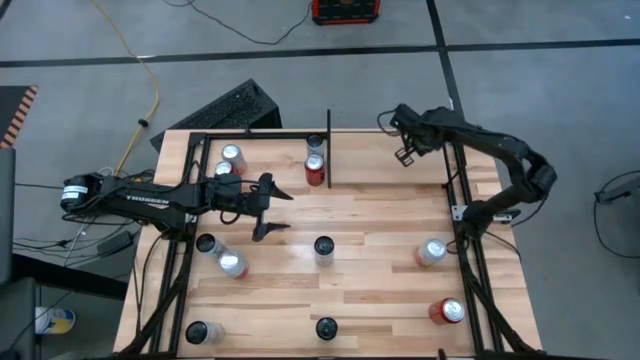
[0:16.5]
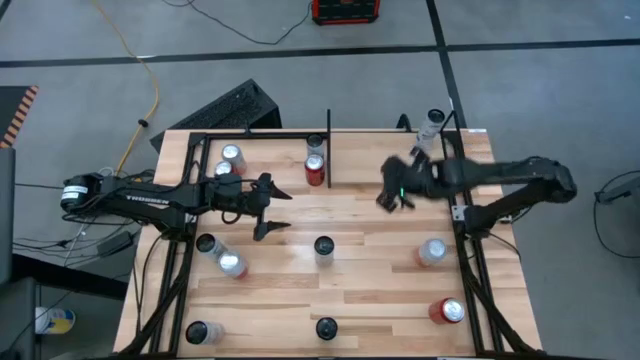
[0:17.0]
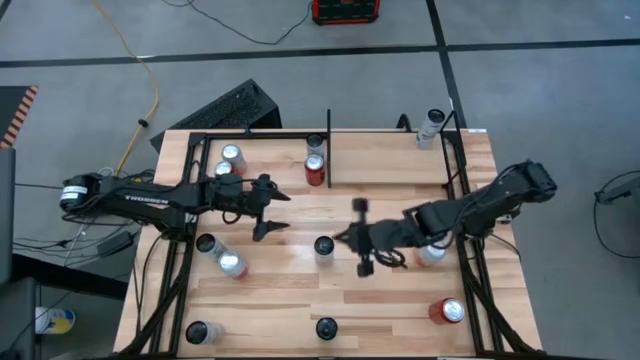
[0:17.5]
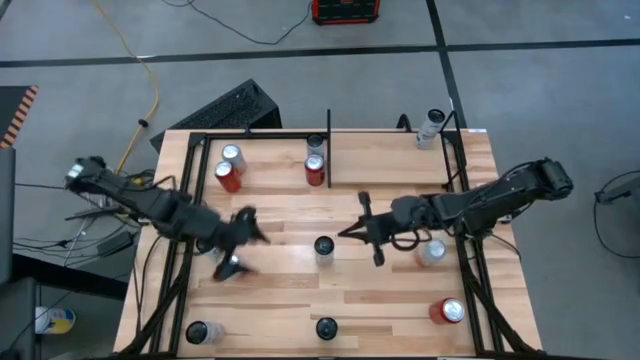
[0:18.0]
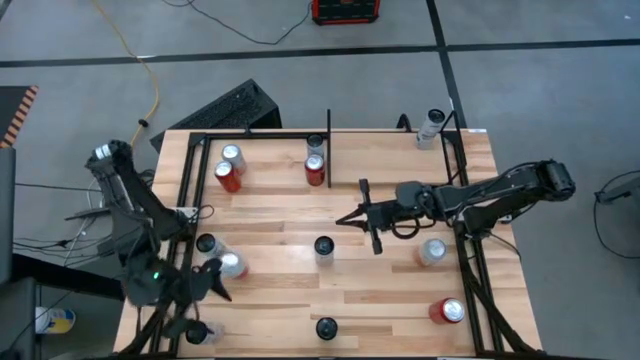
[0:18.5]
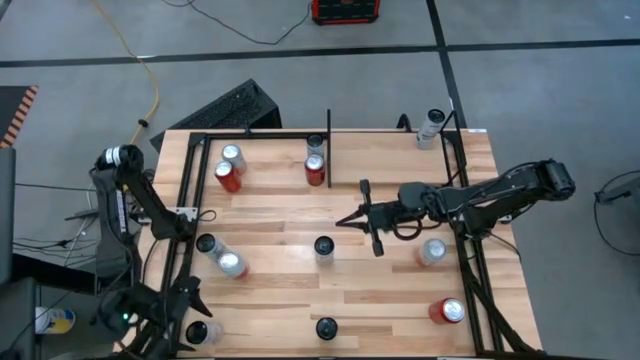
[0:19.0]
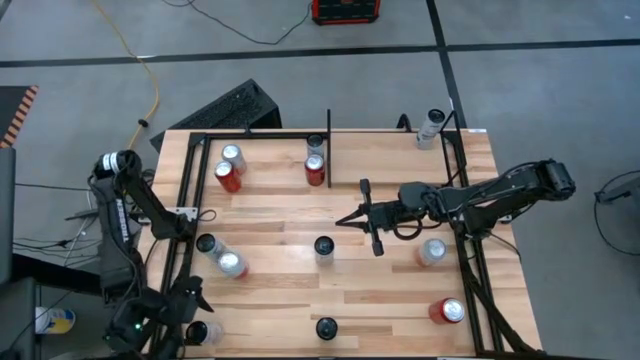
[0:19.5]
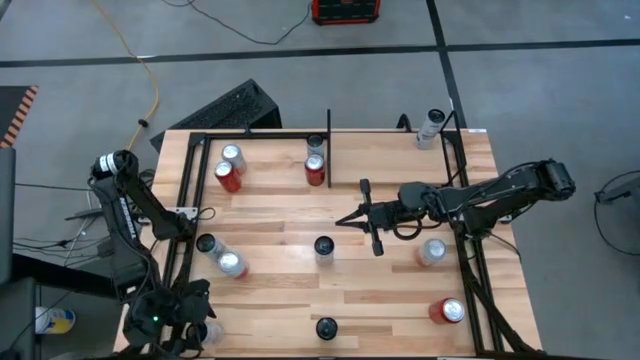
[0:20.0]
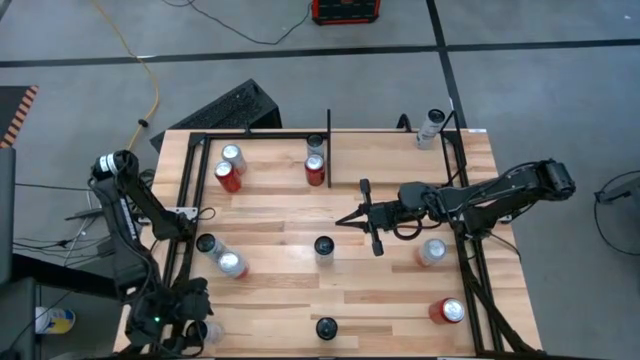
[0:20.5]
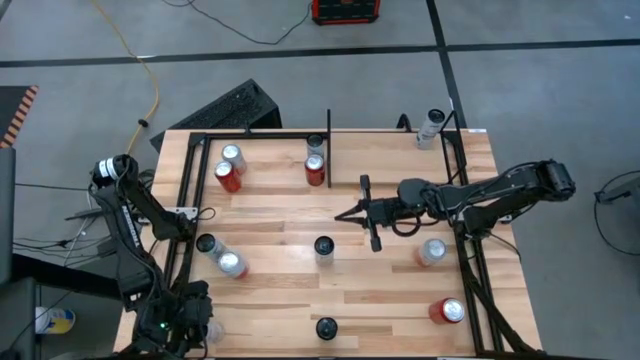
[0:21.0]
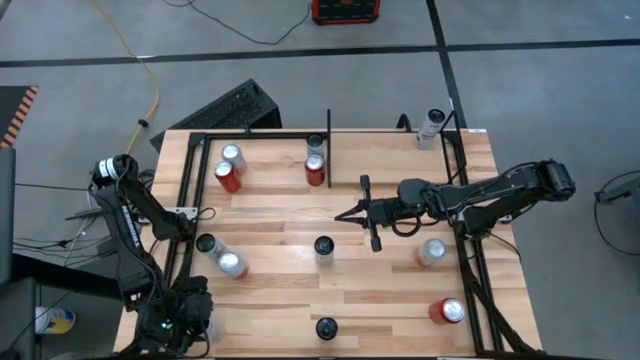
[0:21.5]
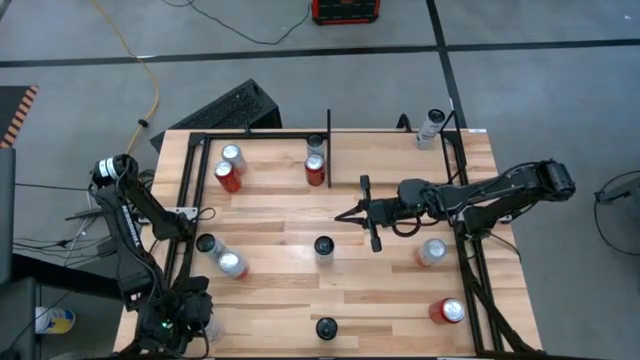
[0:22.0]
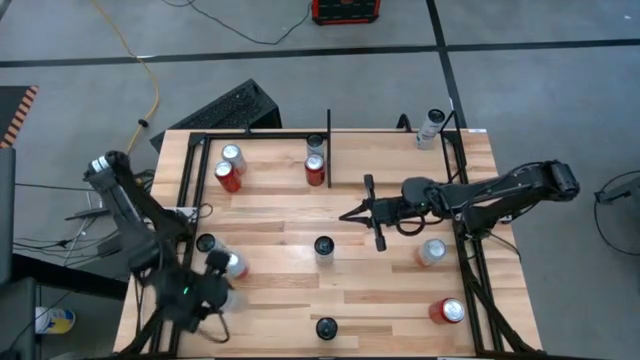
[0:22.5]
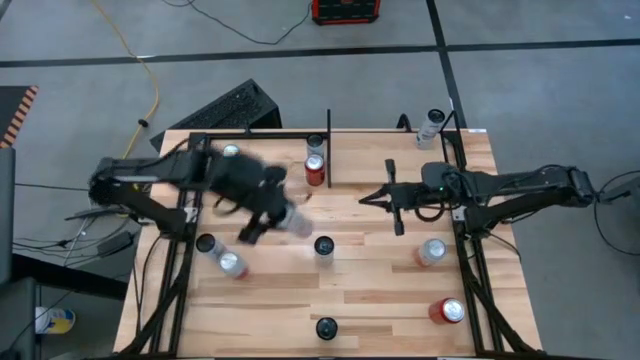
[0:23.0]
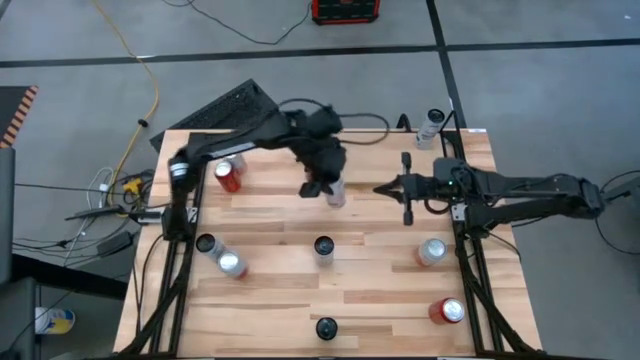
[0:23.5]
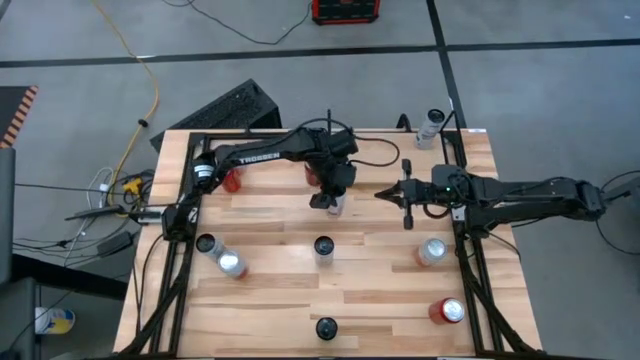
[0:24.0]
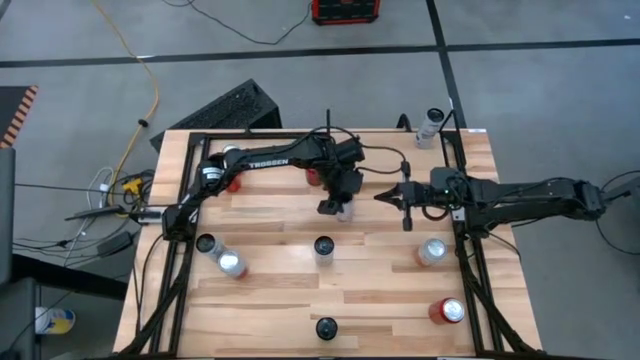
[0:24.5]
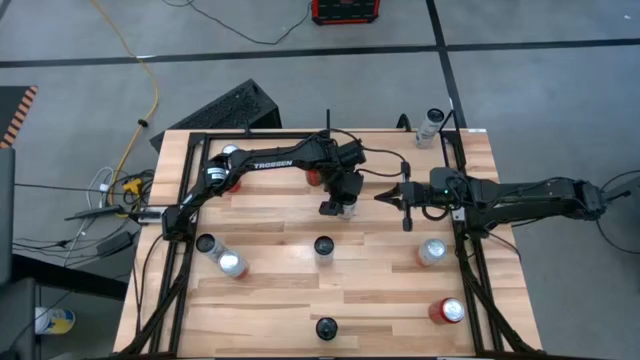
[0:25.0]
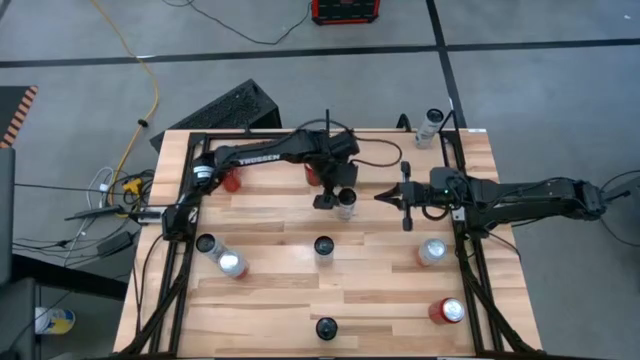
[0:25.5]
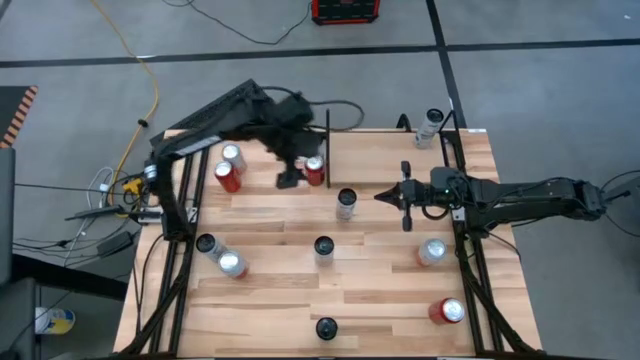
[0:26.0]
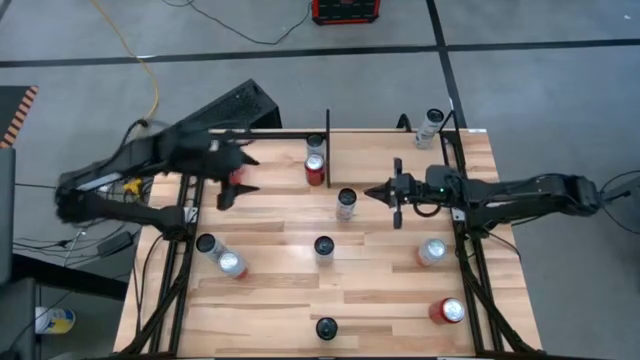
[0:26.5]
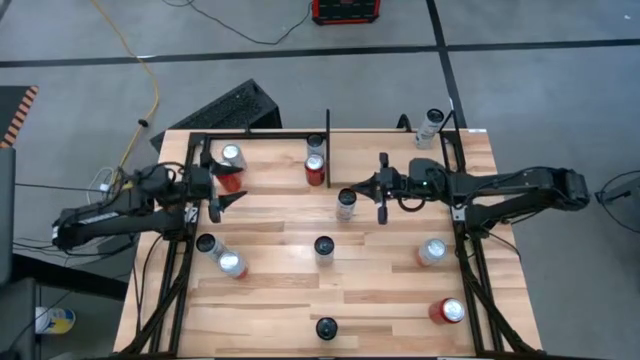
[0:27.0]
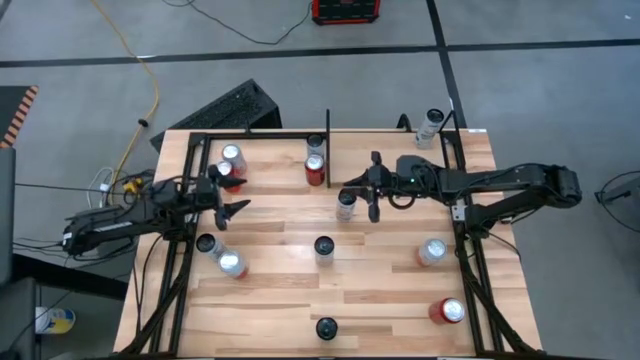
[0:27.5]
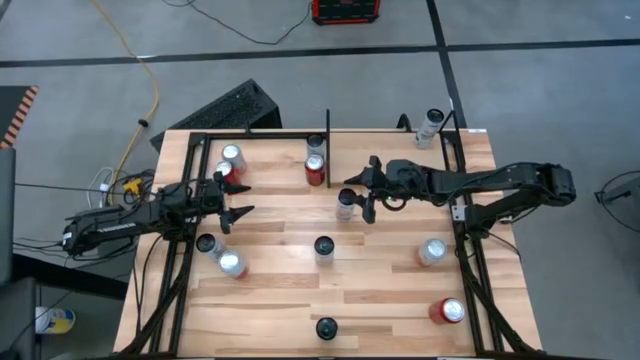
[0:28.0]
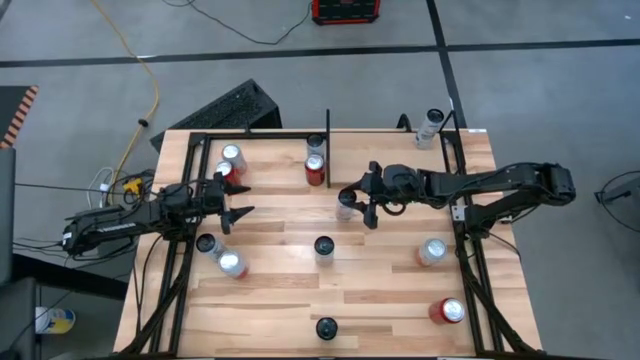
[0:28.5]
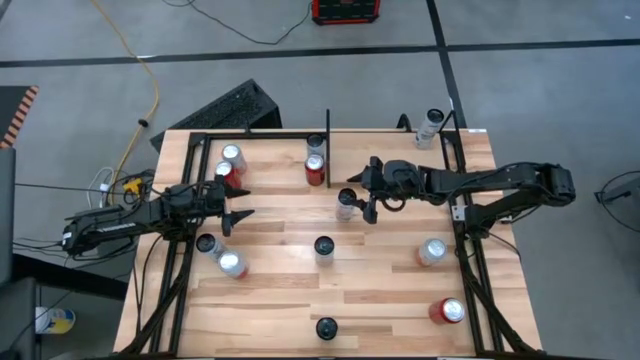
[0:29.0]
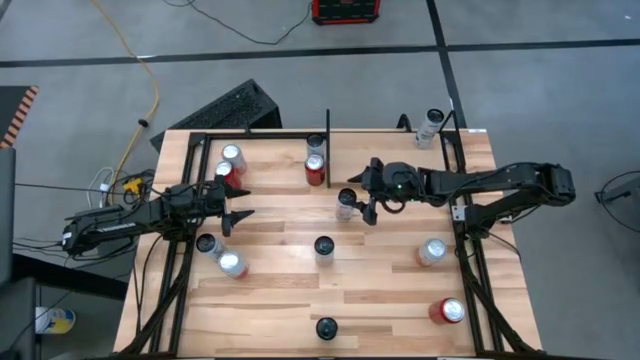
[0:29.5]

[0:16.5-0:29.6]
Task: Place canned beverage on shelf
Put the black pink soda can on the shelf

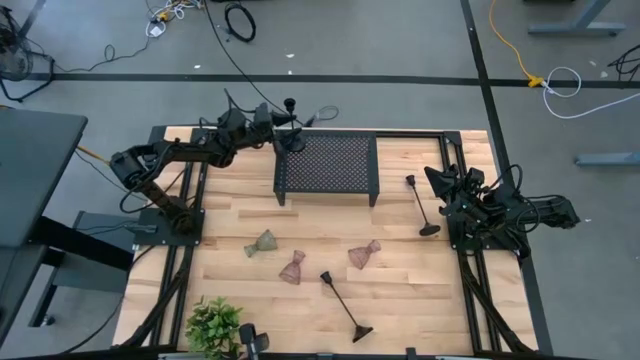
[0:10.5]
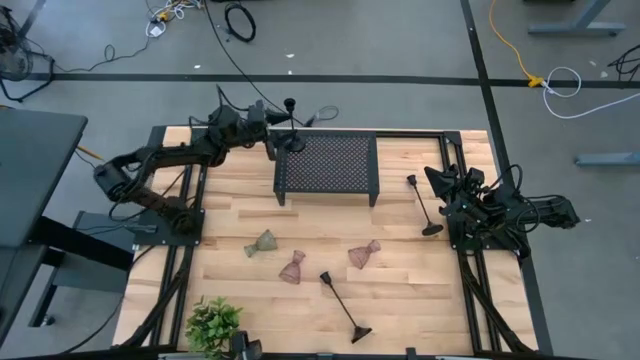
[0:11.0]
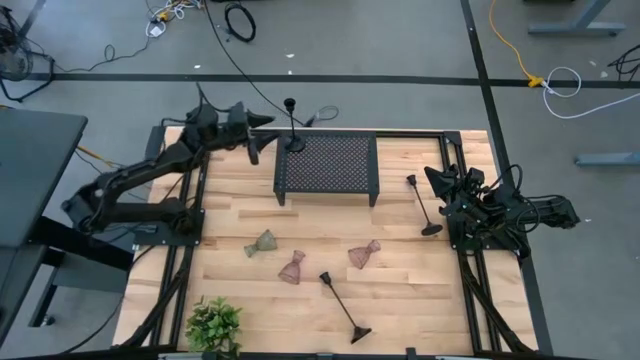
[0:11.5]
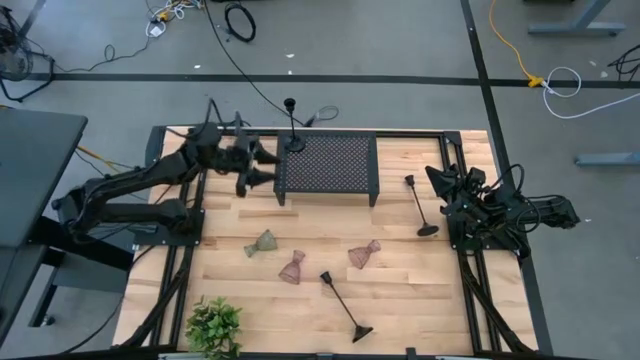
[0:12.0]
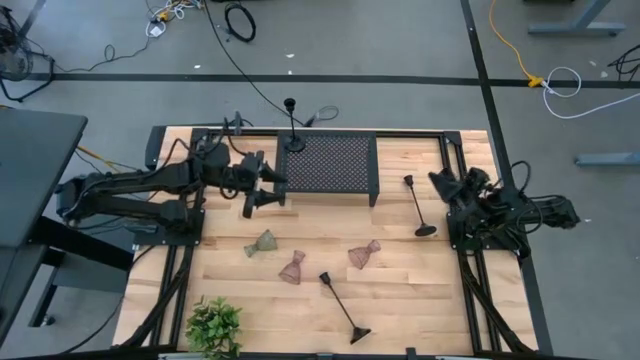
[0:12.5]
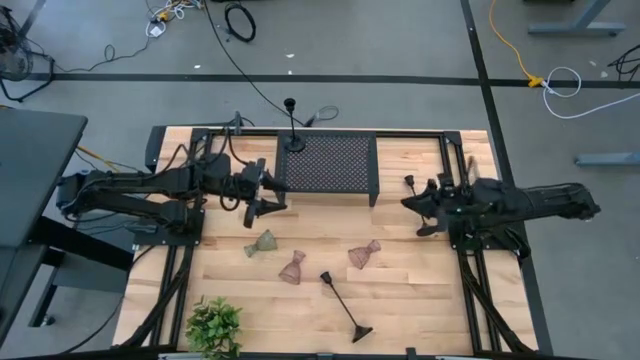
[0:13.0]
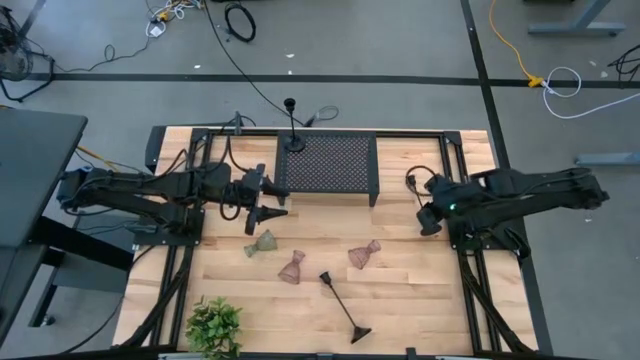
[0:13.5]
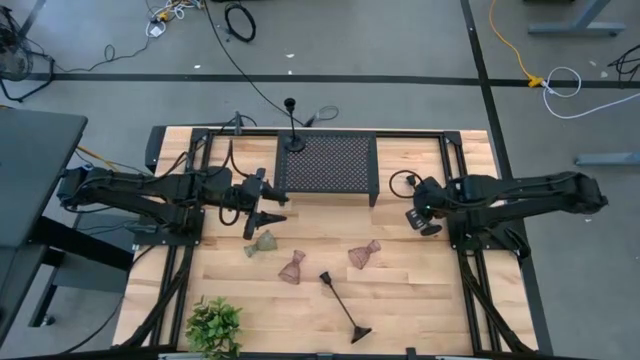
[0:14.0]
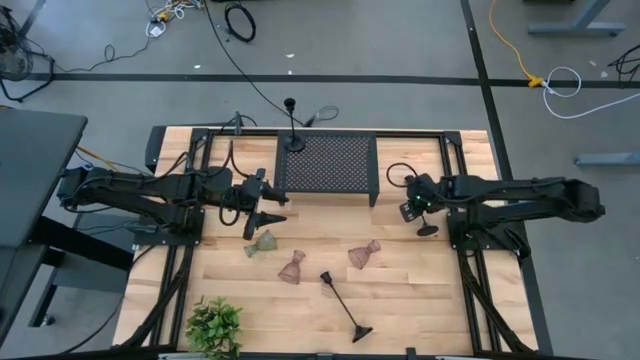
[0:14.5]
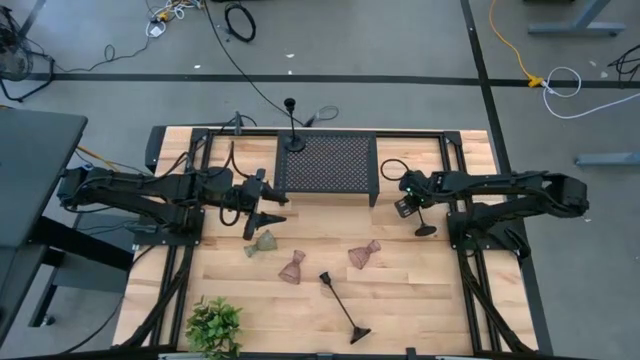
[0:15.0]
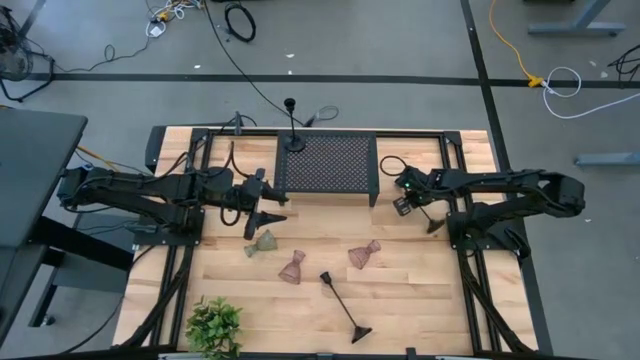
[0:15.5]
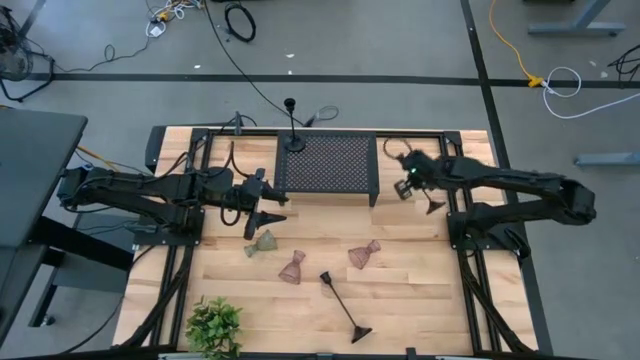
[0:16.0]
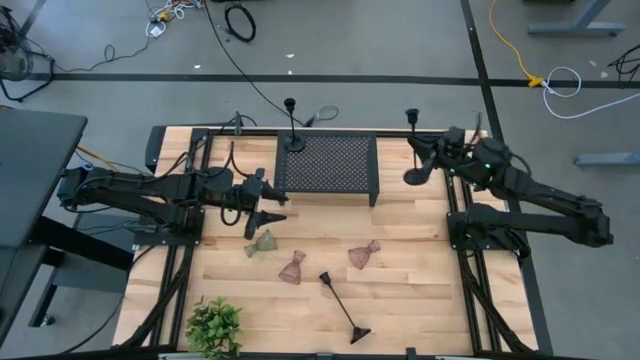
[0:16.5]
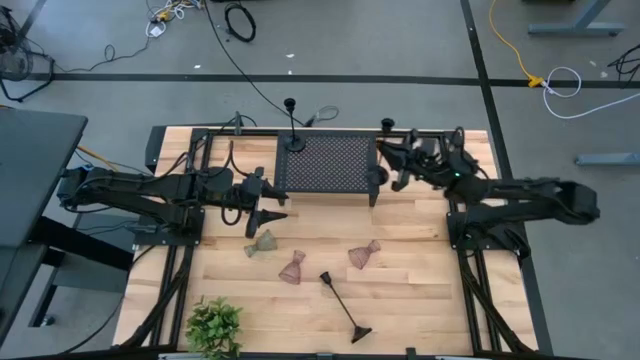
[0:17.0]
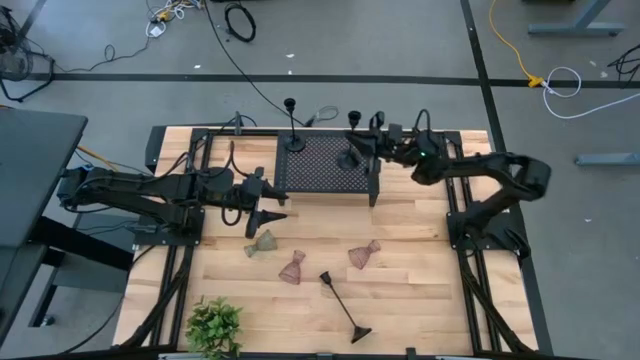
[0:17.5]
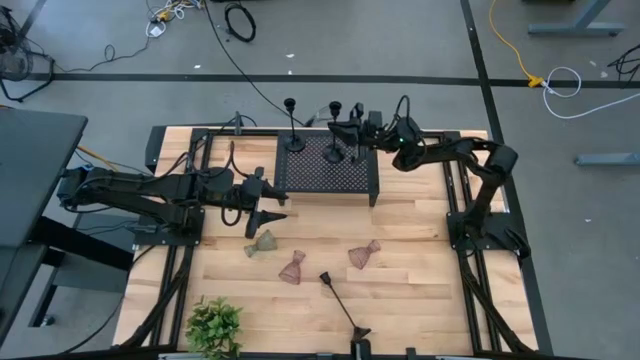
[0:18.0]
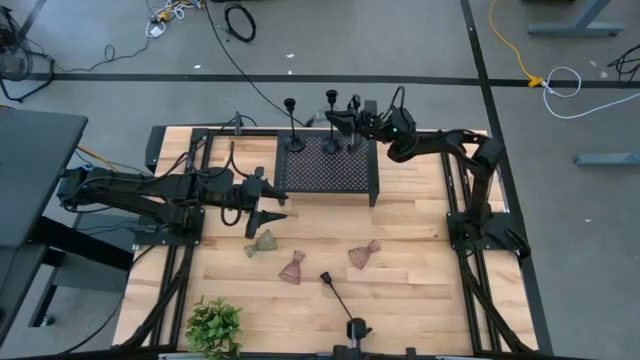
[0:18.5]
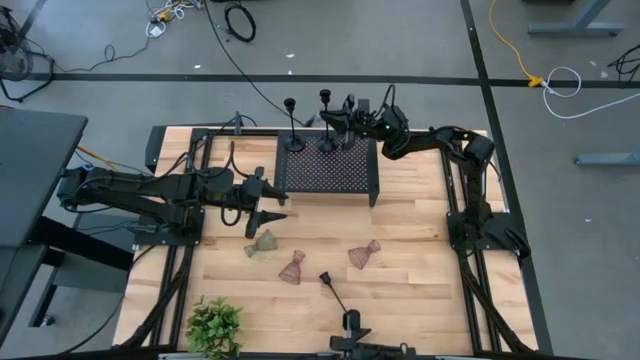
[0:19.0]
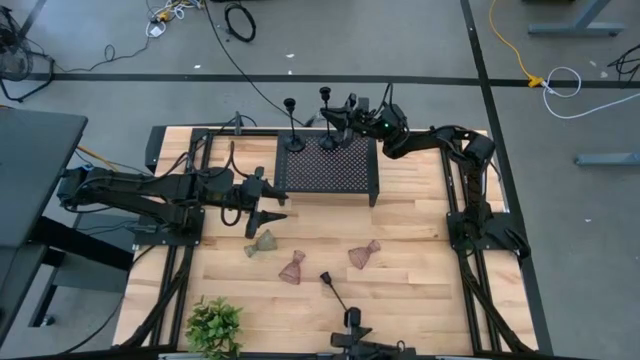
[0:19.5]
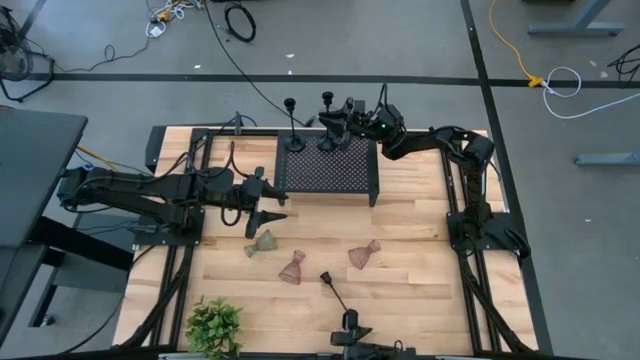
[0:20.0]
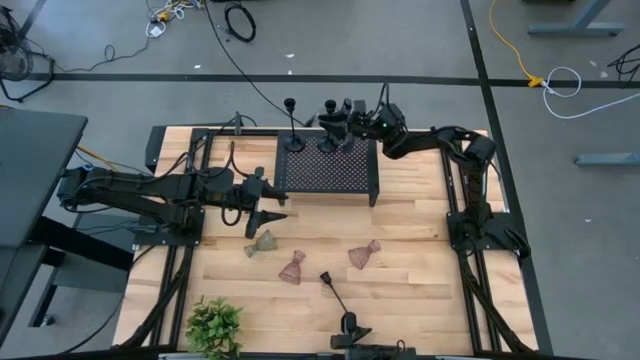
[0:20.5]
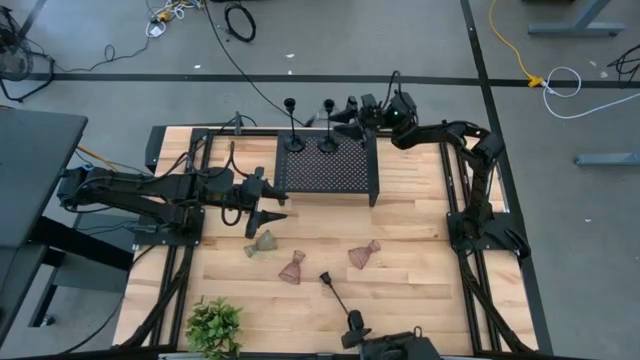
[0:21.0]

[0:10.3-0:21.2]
Task: Pick & Place candle stick holders
Put the top black candle holder on the shelf aligned with the other black candle holder
